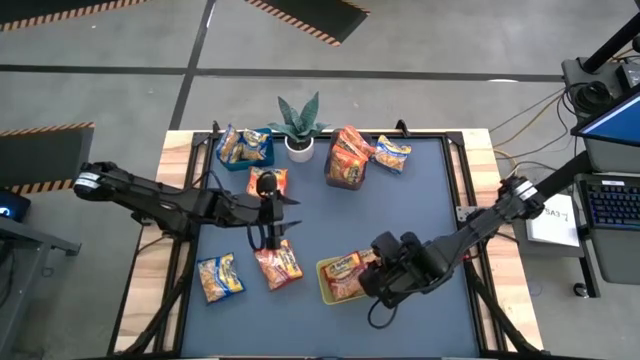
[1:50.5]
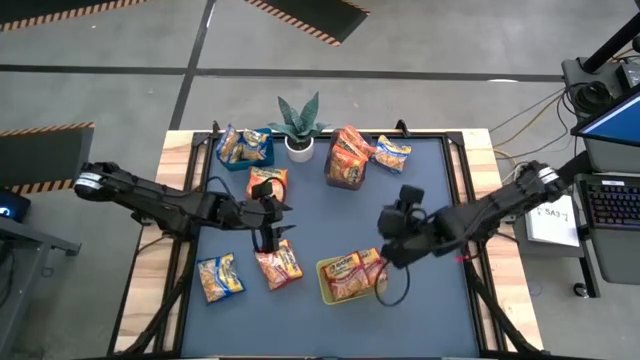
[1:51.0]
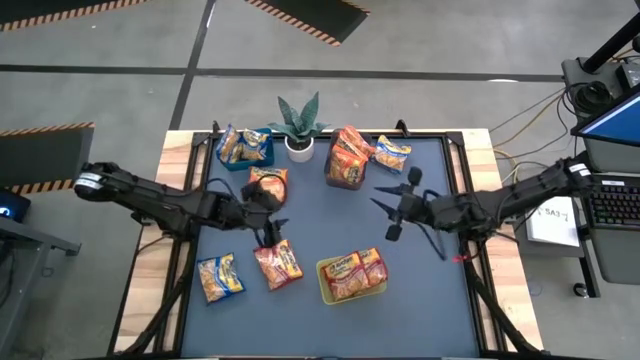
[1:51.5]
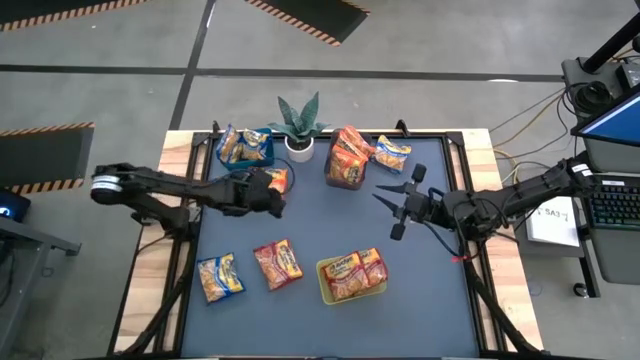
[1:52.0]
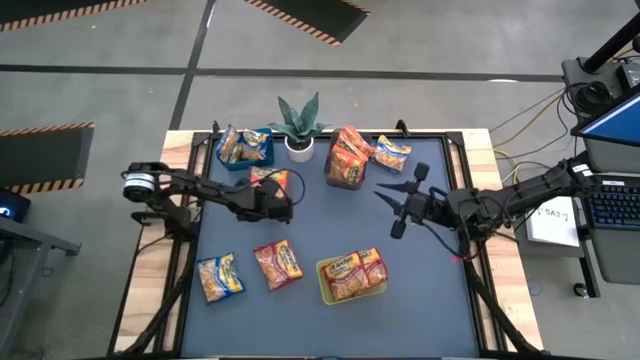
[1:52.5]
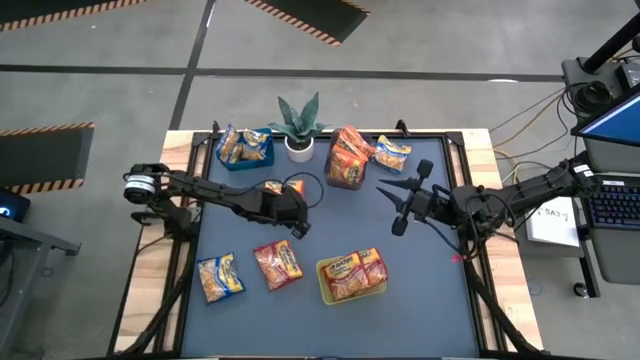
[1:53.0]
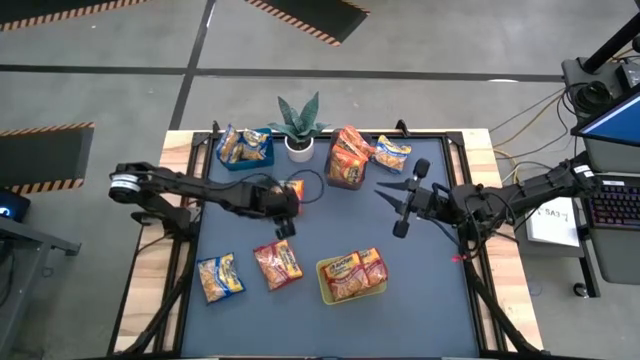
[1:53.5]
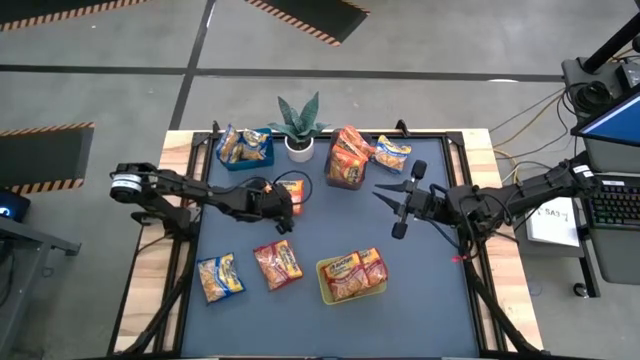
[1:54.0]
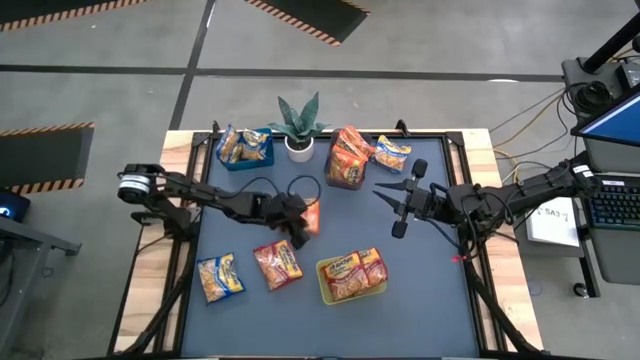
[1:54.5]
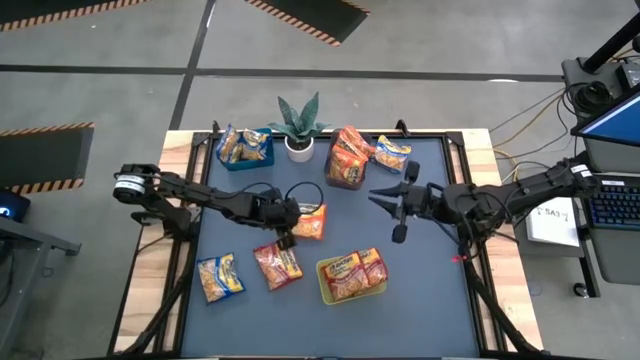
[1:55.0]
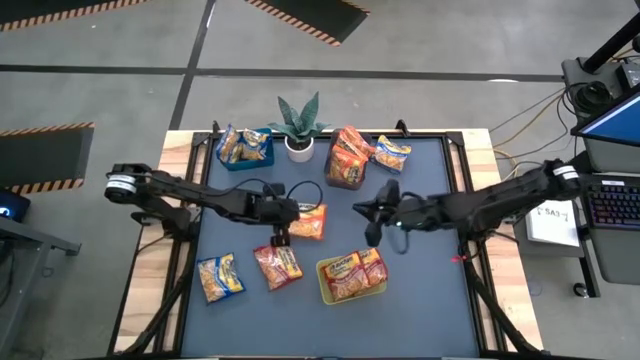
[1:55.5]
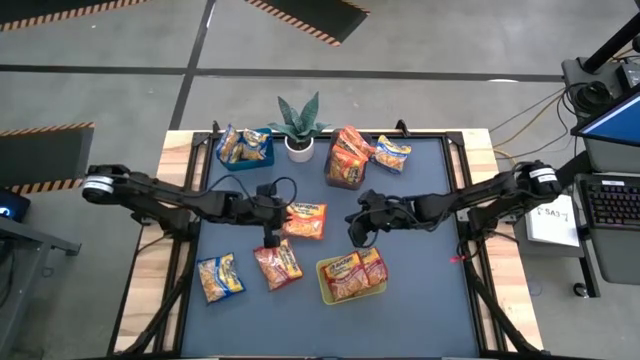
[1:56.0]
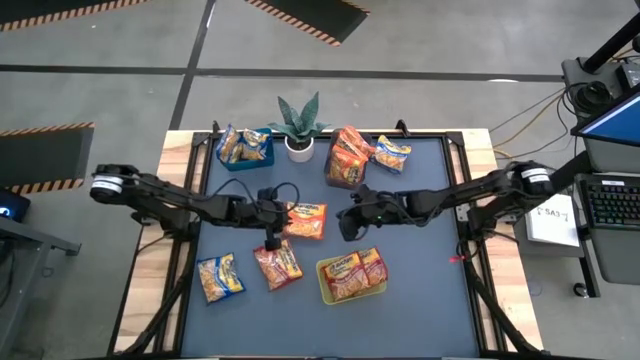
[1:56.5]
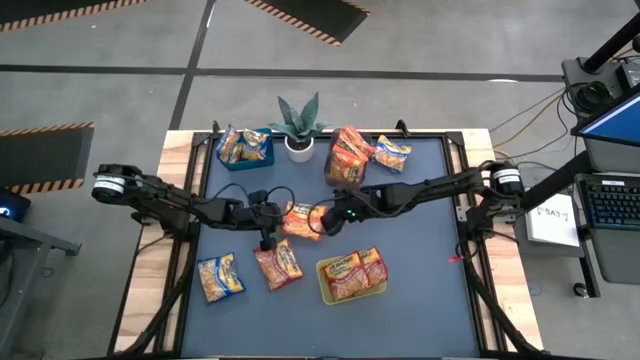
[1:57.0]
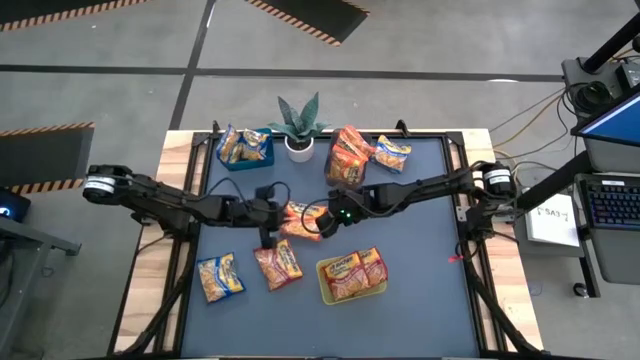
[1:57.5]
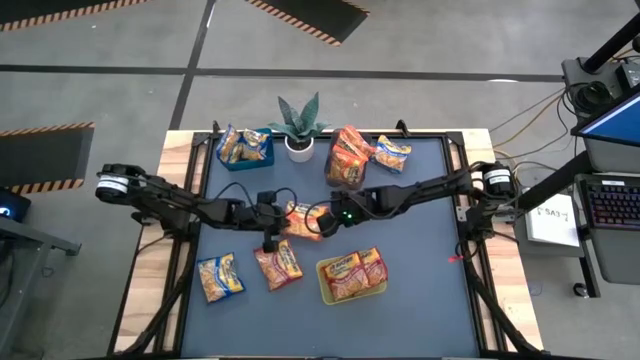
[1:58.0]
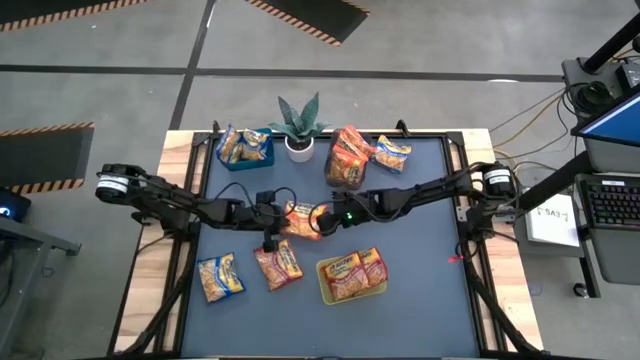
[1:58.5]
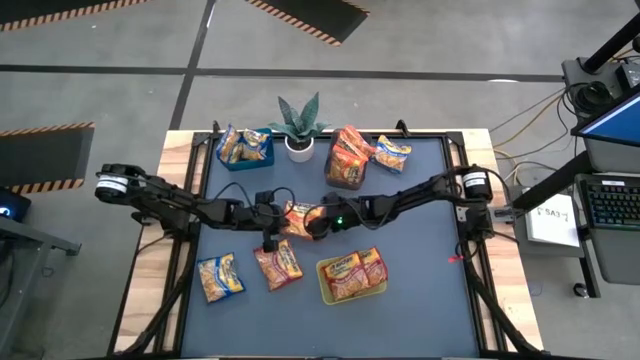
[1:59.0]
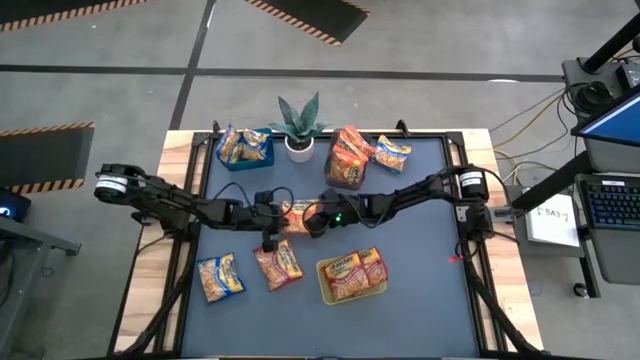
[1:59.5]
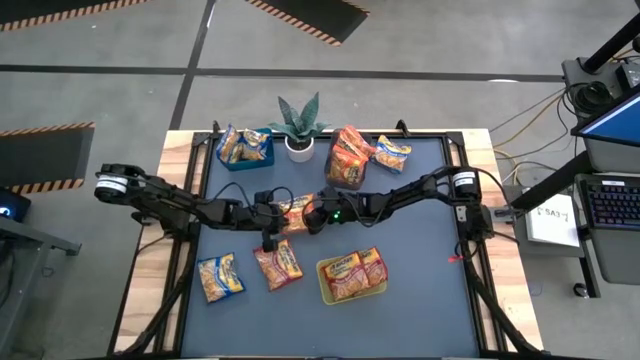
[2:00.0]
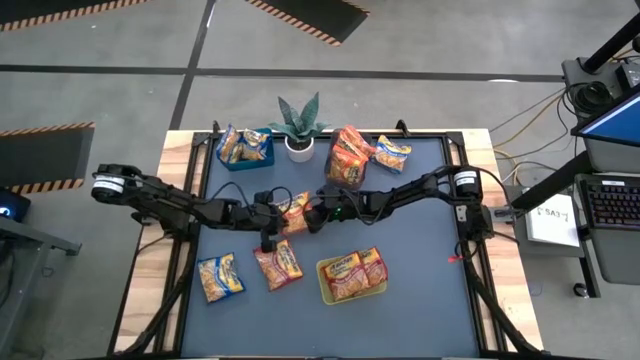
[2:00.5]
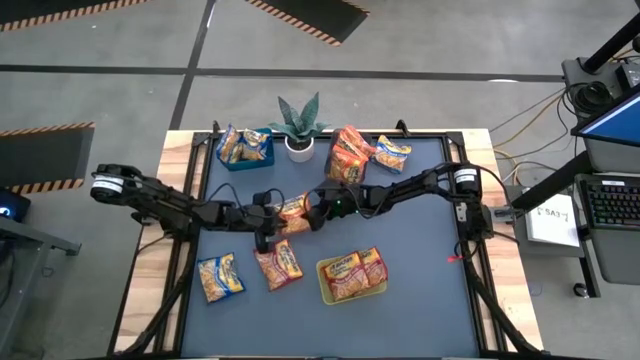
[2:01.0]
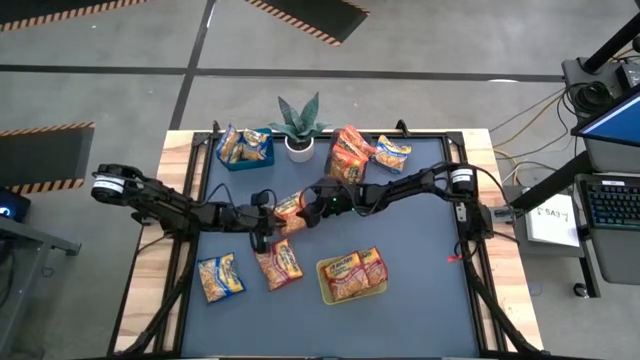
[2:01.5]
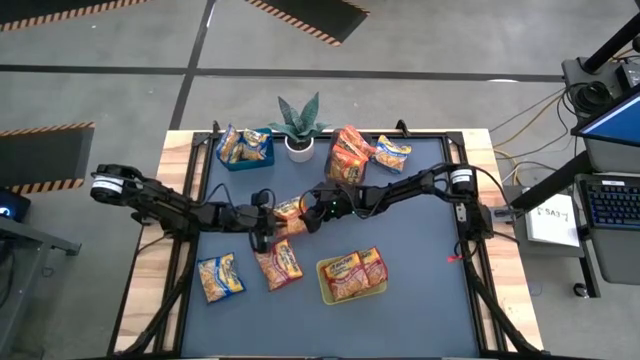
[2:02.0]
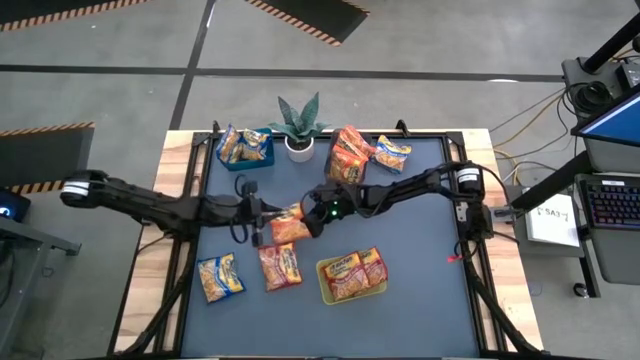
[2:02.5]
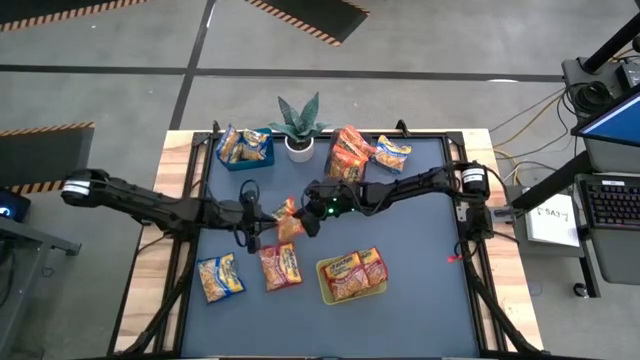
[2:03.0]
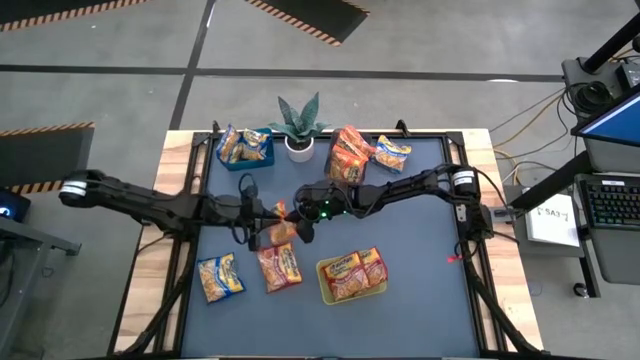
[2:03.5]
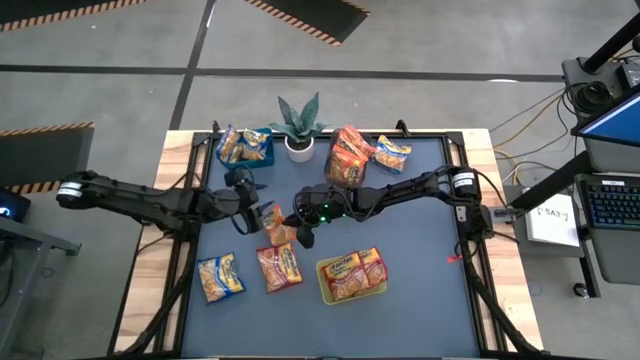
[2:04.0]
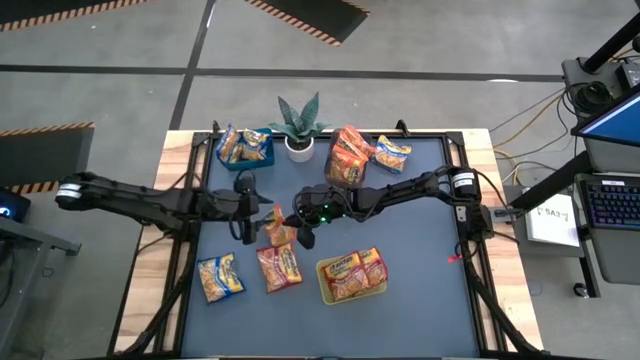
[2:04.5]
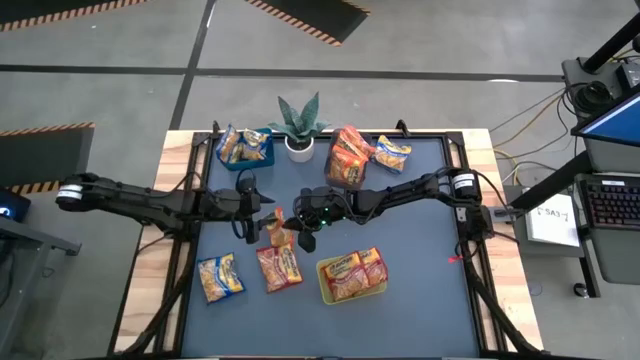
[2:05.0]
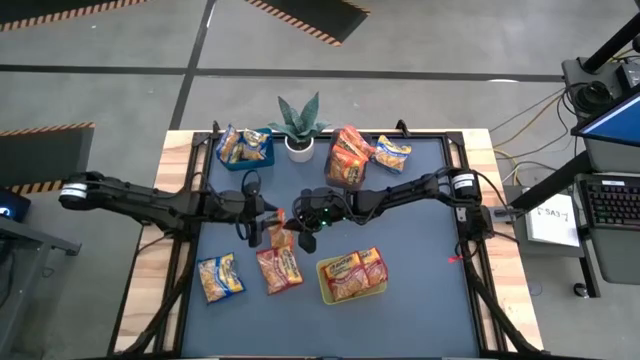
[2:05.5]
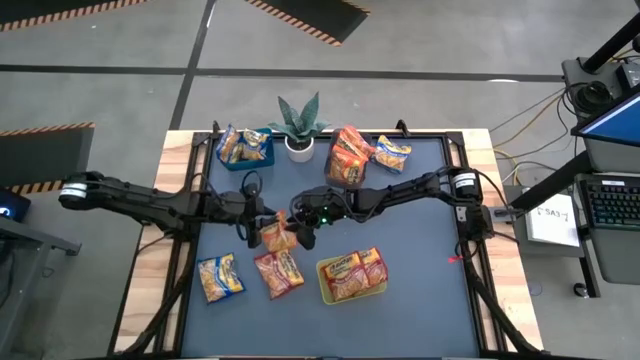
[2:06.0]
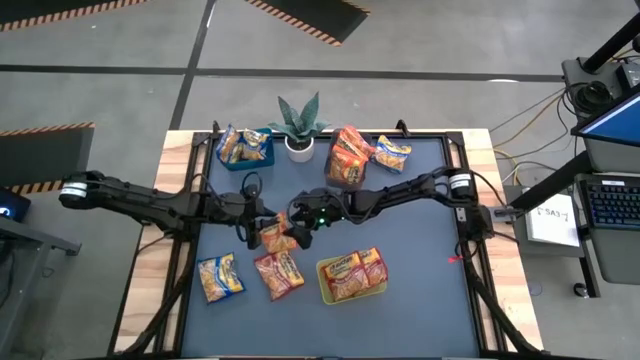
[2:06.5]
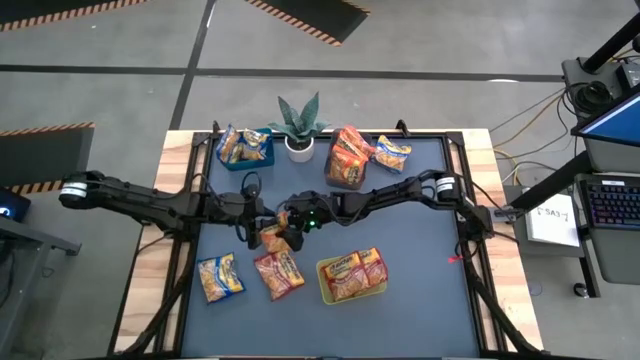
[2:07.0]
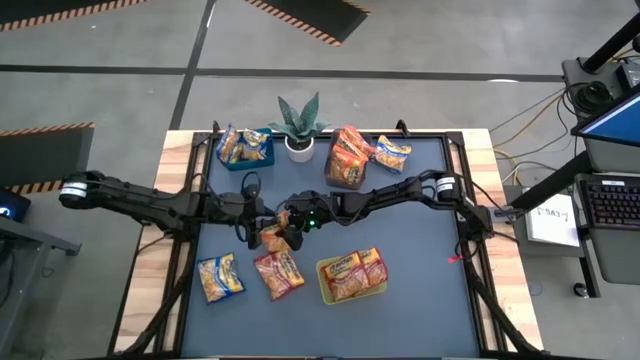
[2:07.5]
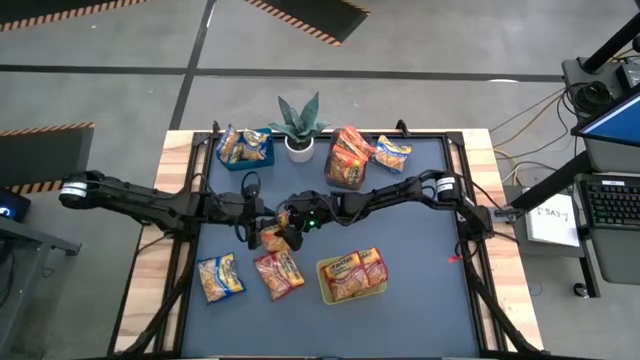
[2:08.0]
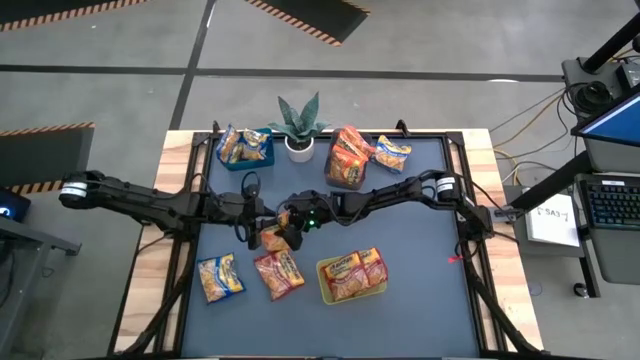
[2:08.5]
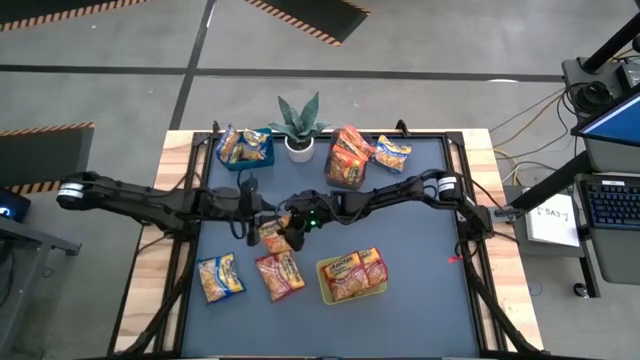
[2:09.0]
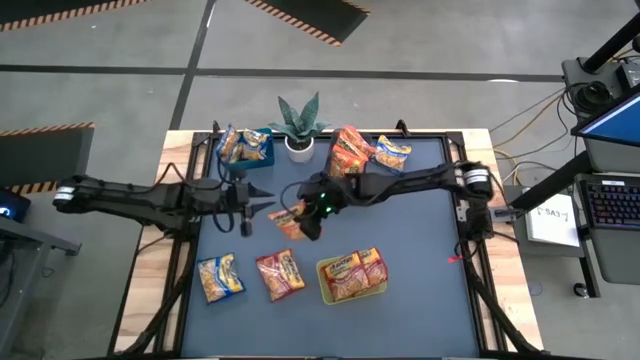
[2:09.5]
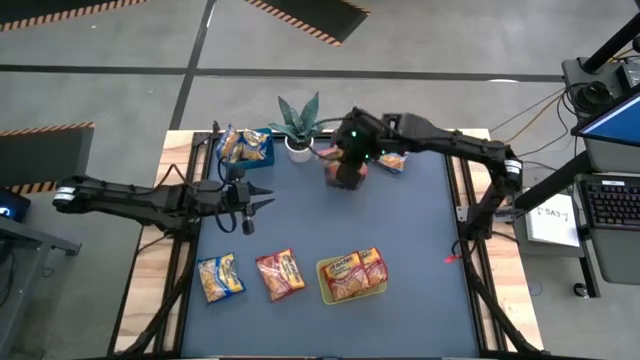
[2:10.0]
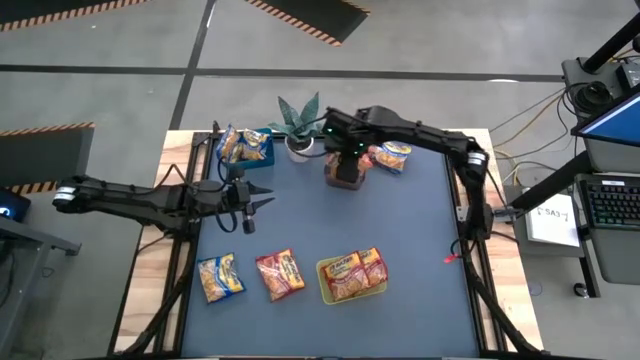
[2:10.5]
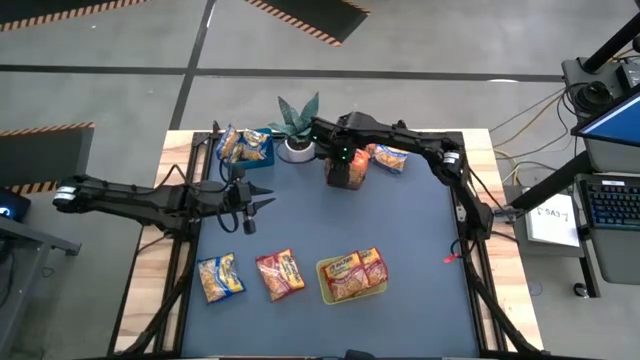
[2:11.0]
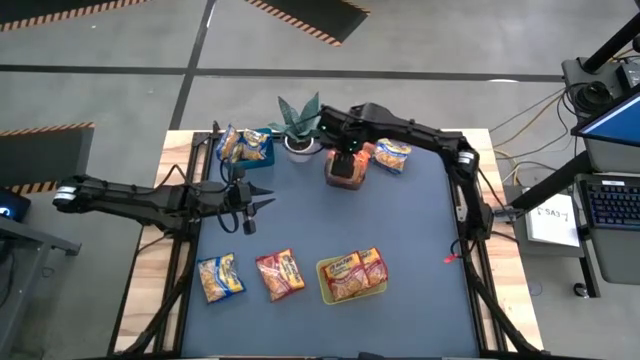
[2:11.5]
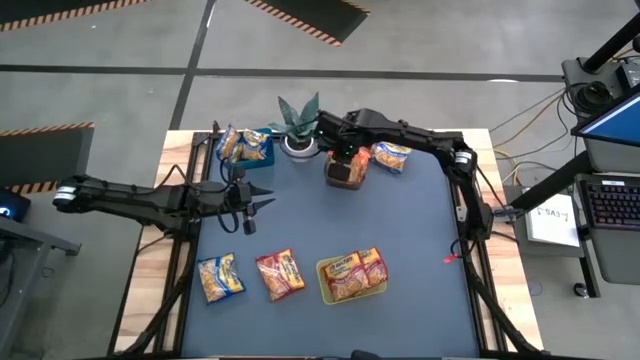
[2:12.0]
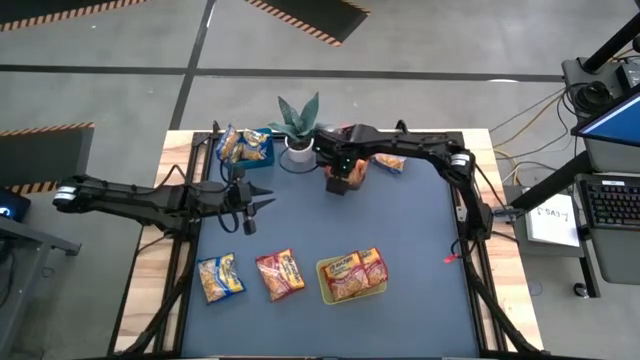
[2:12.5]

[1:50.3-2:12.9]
Task: Sort Maruchan noodles
Put the orange bag into the black bin
